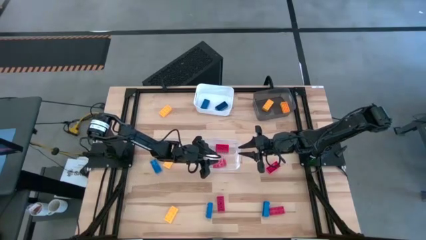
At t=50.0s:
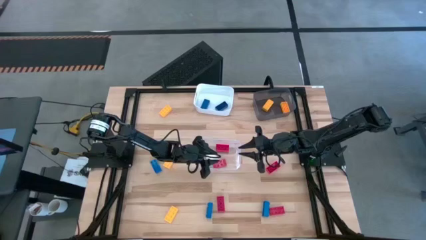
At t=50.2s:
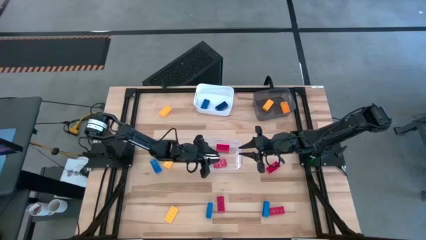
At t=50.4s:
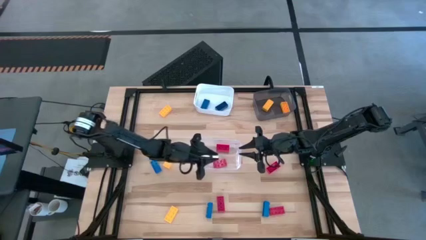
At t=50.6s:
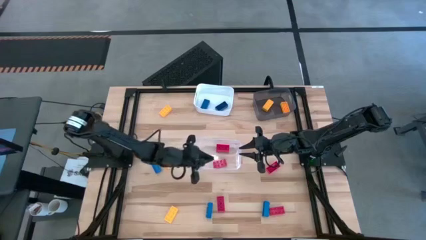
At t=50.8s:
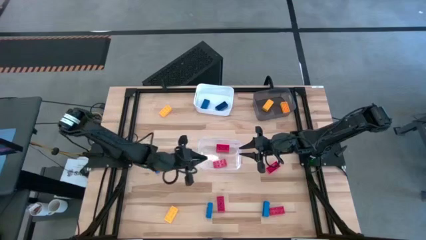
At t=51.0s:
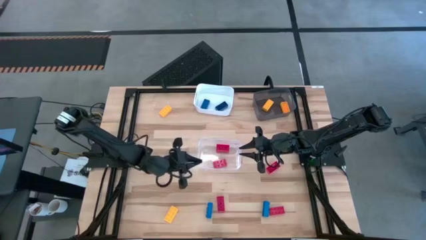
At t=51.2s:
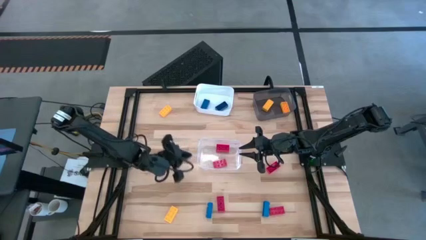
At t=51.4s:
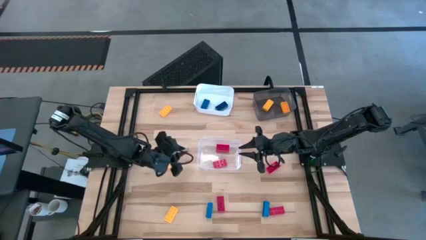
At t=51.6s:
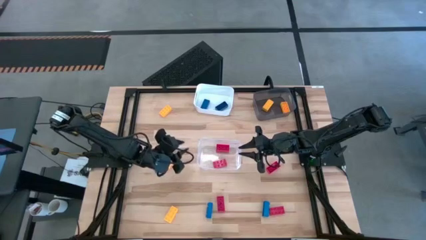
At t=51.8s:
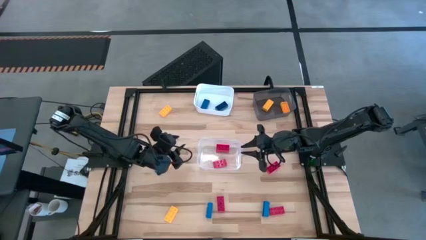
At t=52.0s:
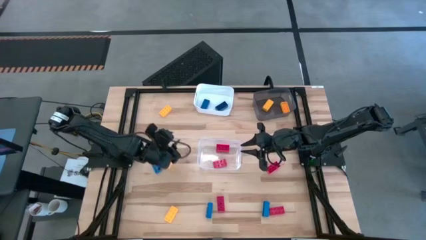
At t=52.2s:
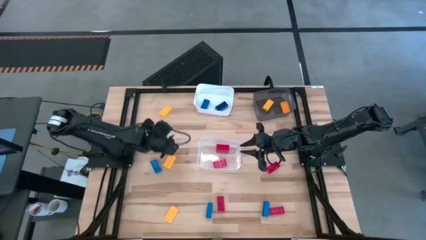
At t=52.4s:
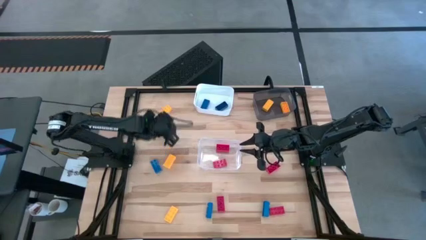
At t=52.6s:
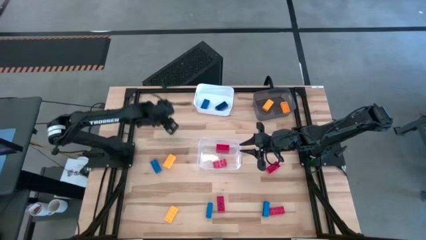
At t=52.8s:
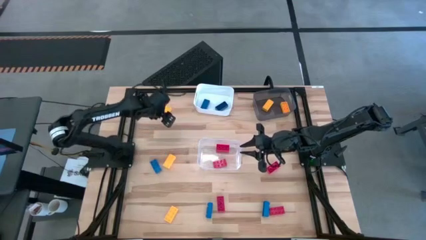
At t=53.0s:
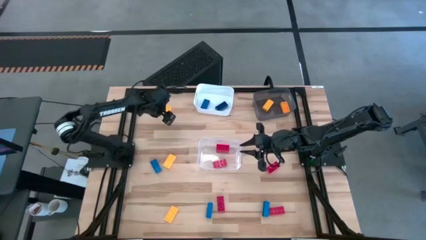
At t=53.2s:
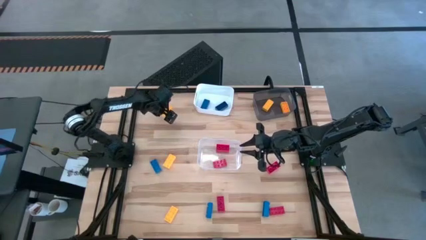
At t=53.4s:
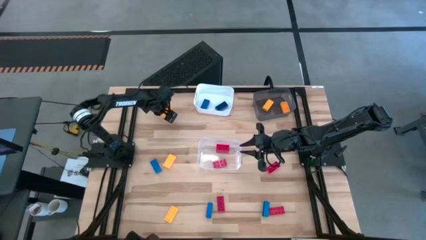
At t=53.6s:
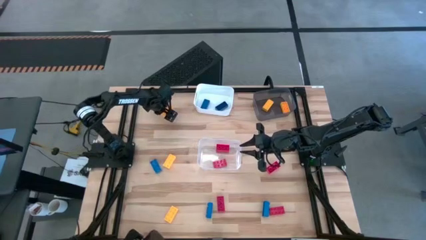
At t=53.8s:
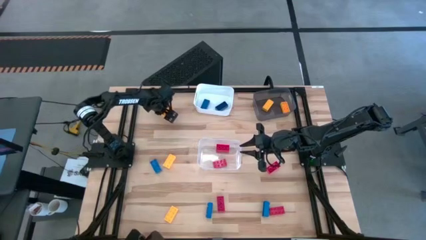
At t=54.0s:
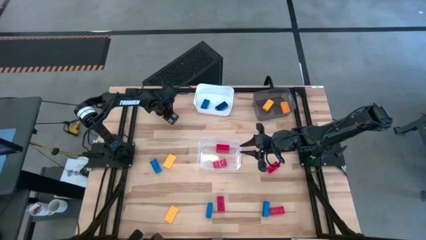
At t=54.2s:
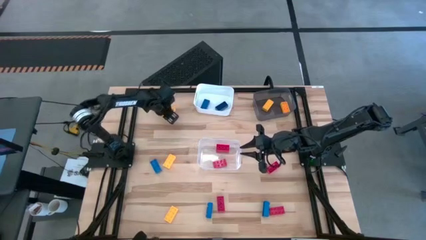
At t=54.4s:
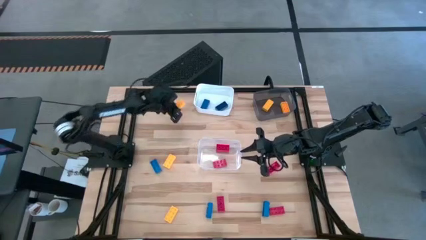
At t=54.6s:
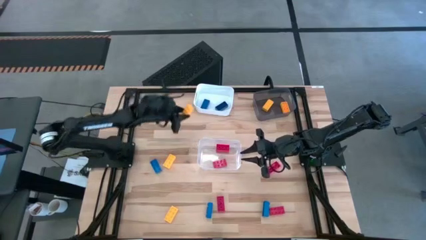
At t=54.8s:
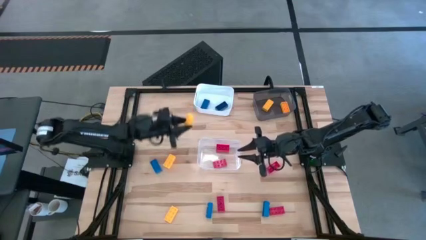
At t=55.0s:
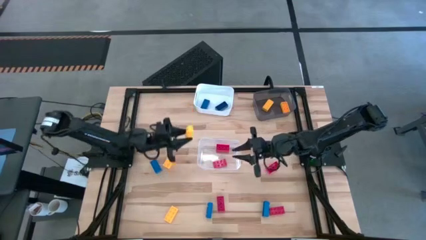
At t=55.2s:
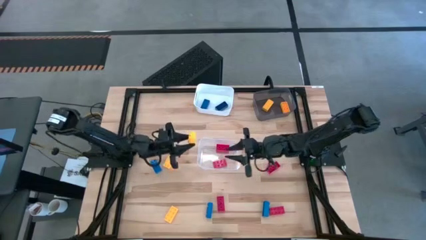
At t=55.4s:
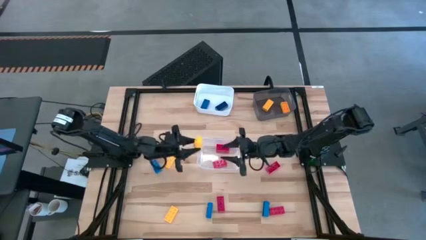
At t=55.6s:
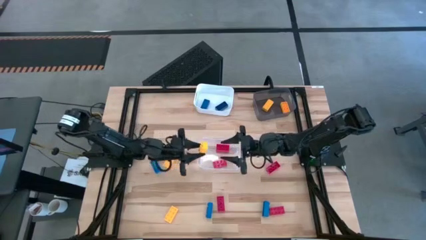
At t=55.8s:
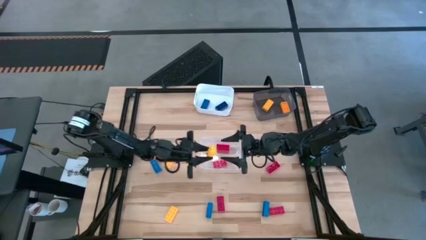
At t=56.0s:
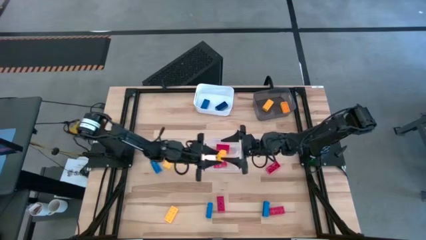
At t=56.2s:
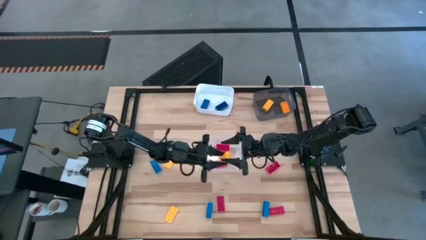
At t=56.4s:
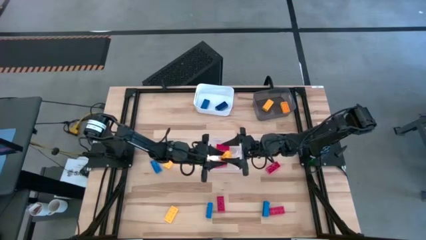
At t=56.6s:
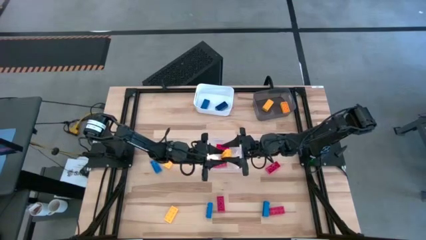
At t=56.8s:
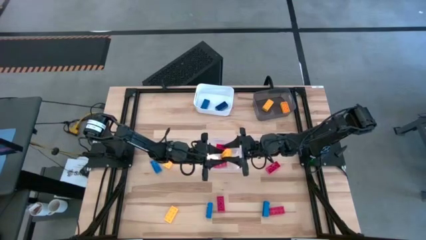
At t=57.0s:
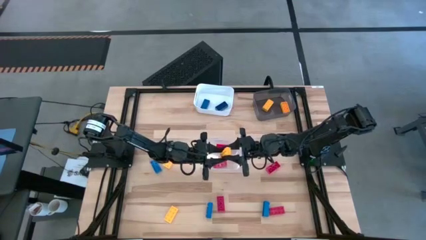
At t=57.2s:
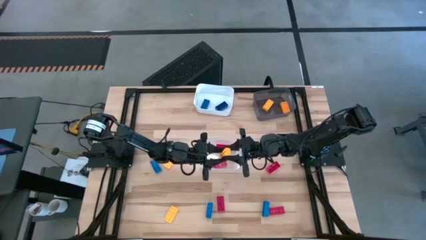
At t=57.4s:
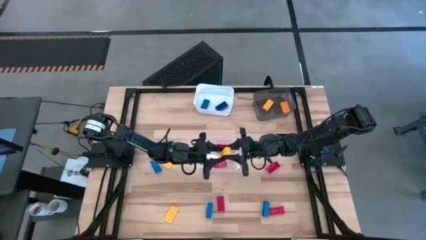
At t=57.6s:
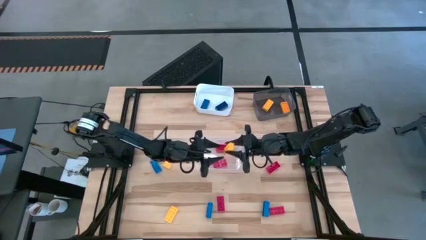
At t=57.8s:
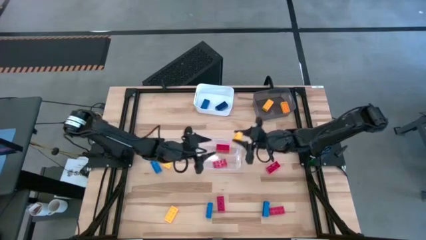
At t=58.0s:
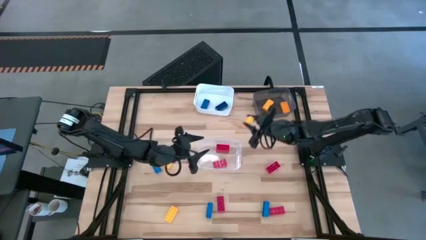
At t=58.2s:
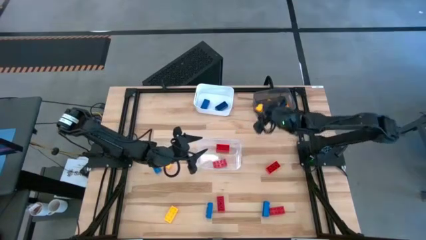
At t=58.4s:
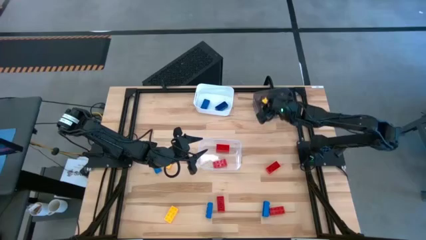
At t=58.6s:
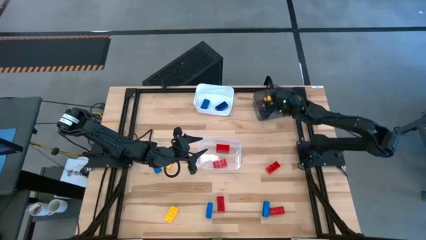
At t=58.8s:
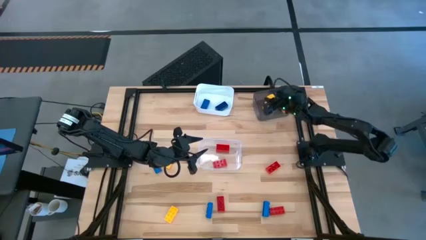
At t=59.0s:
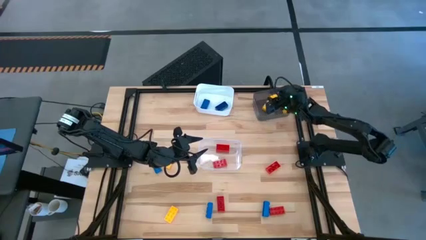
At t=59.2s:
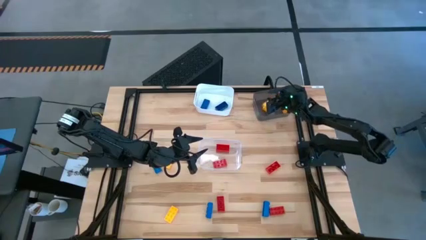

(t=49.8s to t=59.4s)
Task: Sort & place blocks by color
Put the top center yellow block into the black bin

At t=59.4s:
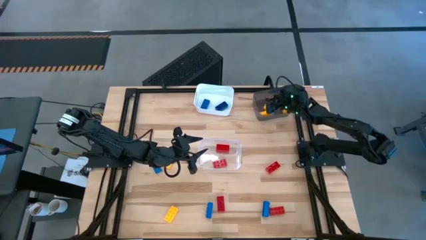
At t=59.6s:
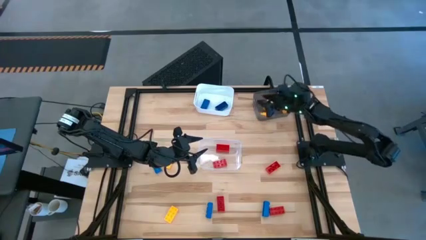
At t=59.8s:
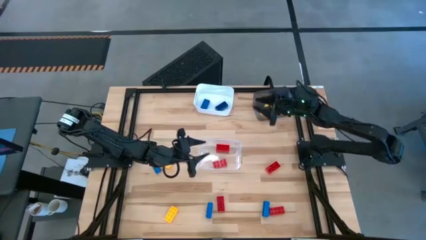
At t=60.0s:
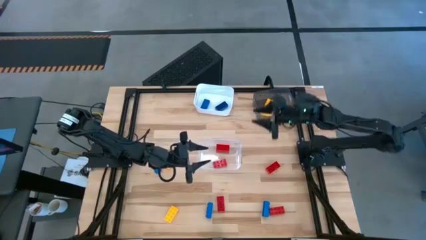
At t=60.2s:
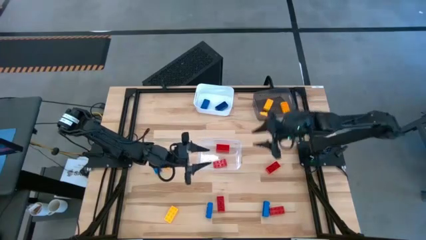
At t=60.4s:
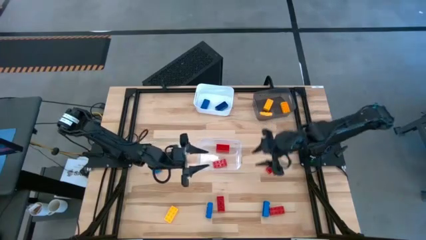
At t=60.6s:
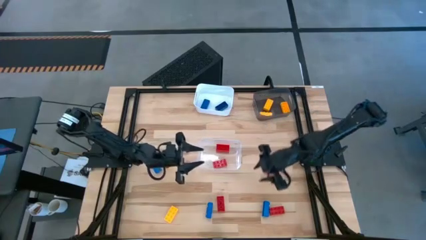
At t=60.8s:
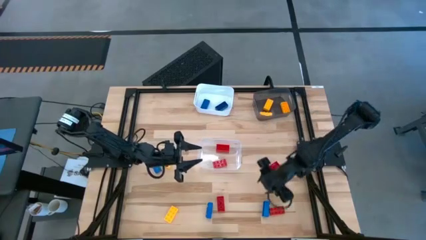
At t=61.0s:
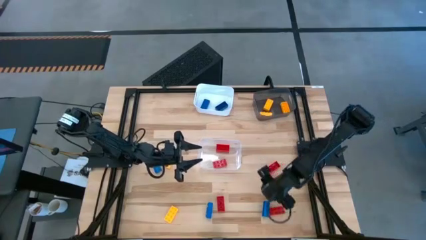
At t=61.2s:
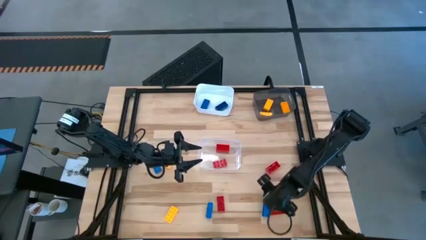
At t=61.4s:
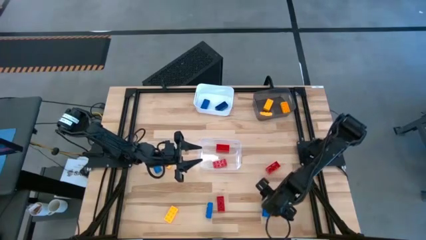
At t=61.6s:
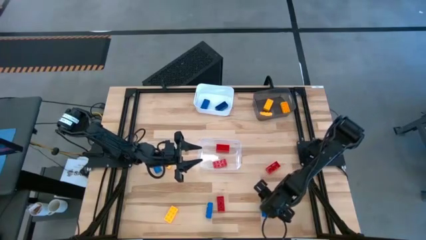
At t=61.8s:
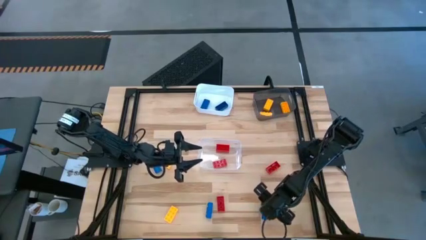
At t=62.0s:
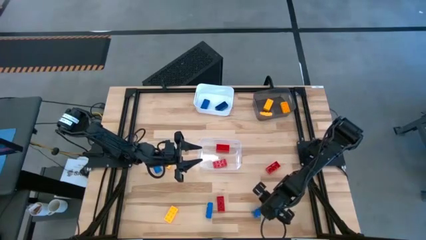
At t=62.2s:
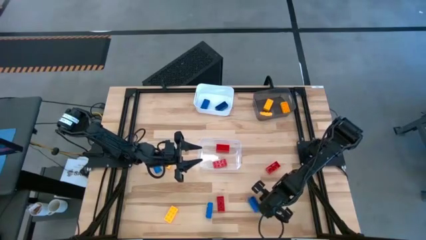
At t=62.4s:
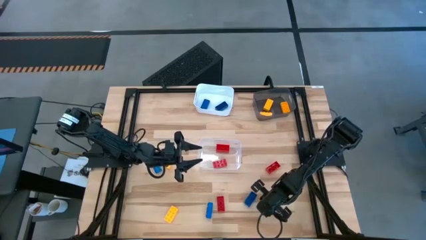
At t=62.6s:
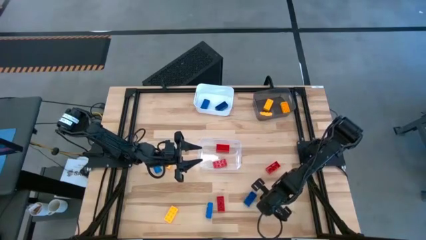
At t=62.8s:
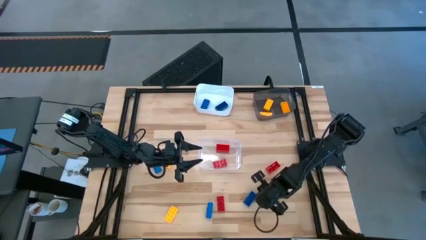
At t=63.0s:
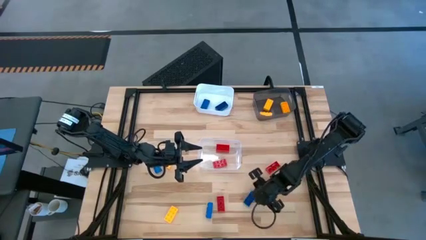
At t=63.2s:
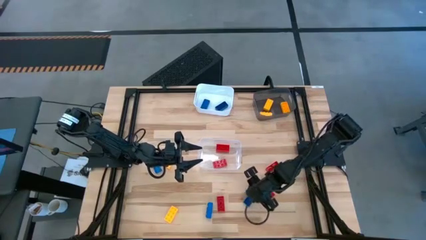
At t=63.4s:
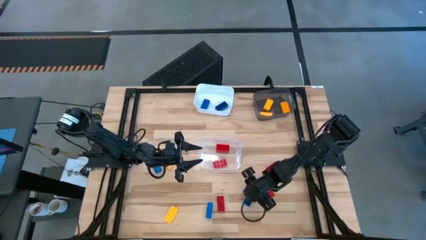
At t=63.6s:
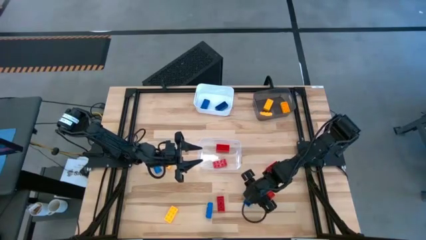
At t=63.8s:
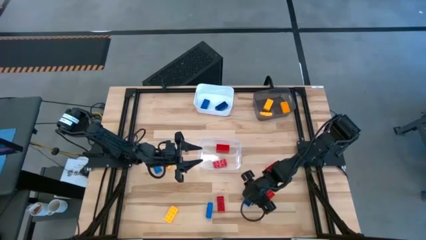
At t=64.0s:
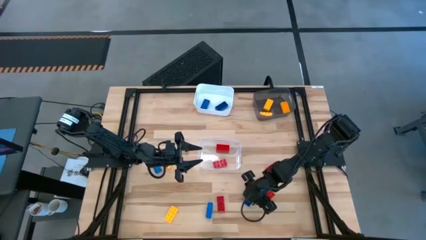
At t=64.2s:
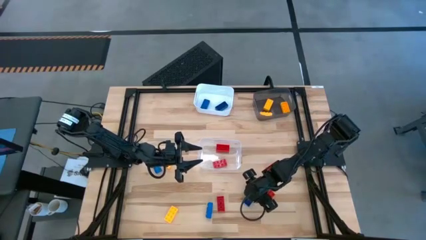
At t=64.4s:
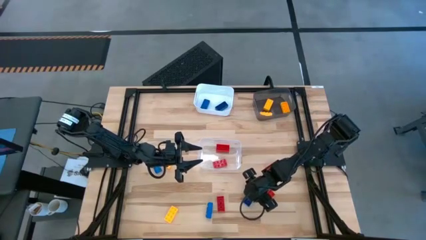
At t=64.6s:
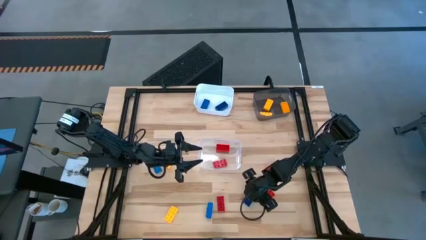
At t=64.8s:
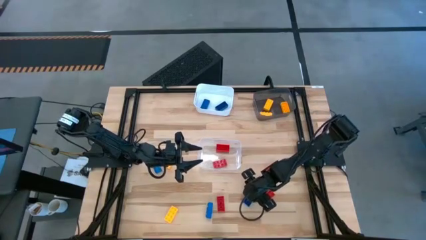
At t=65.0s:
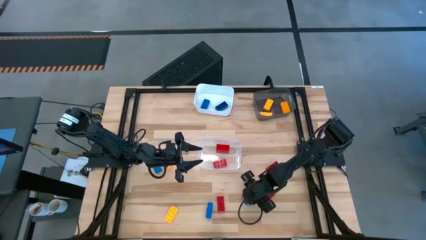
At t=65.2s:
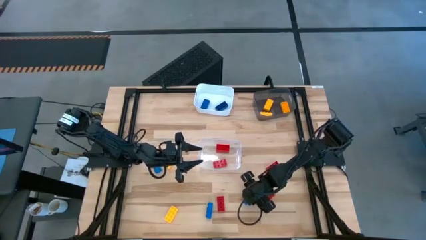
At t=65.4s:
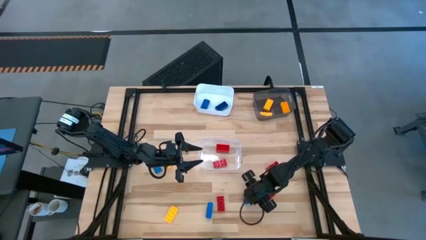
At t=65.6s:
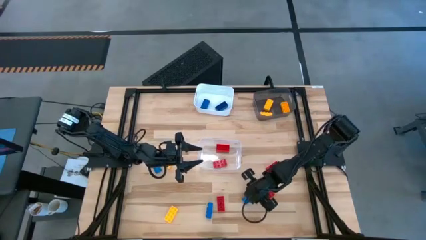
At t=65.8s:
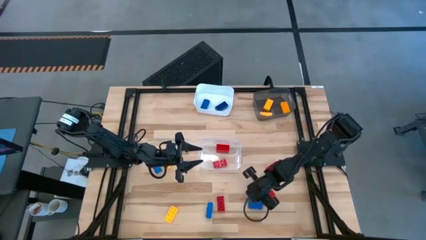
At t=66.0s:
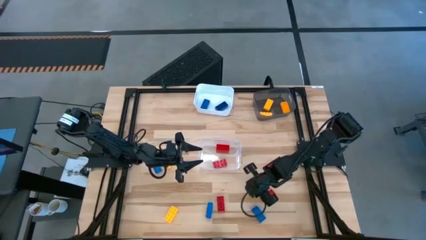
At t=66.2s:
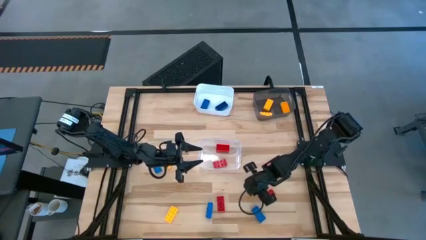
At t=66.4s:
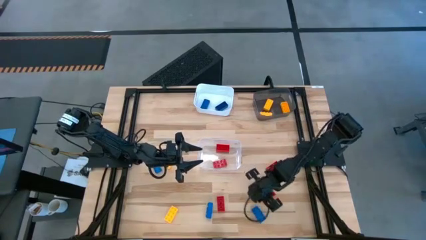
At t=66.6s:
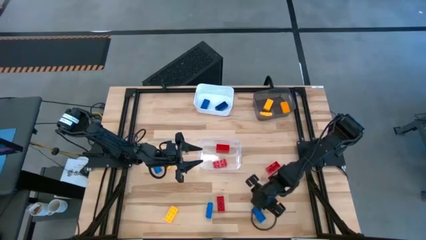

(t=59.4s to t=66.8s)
Put the bottom right blue block into the white bin
